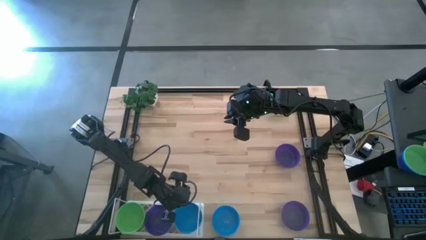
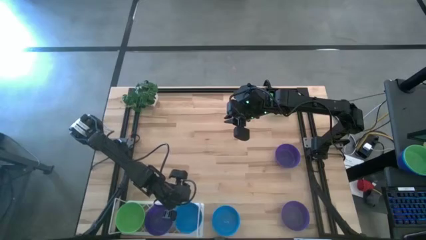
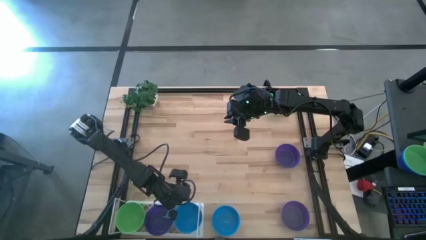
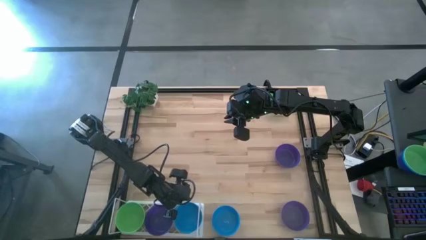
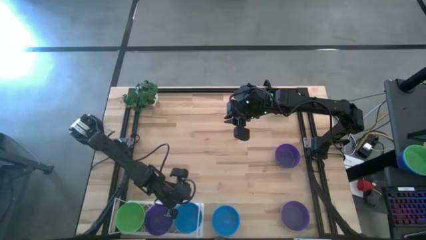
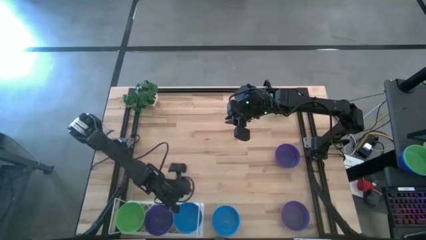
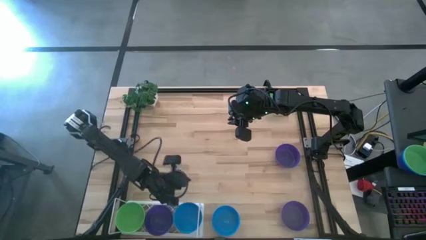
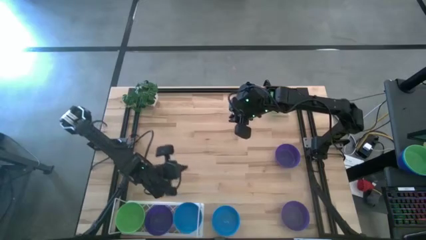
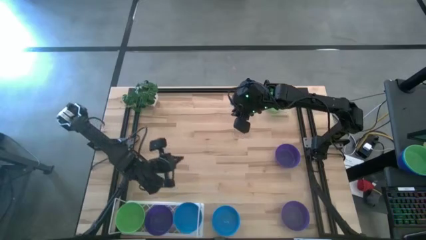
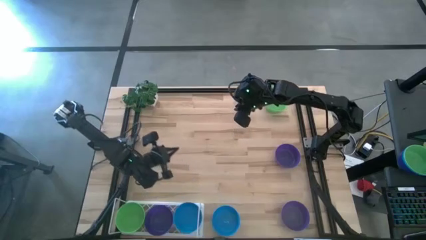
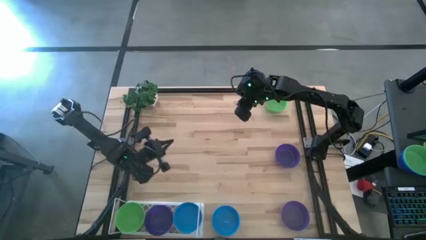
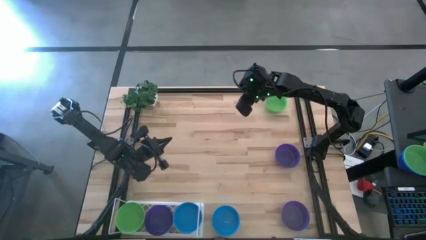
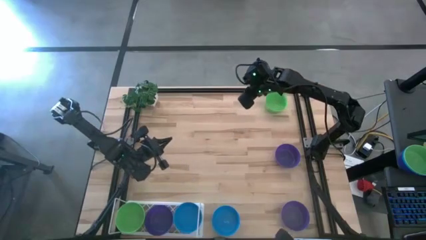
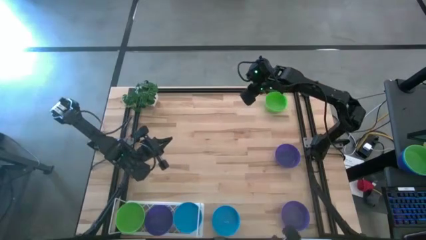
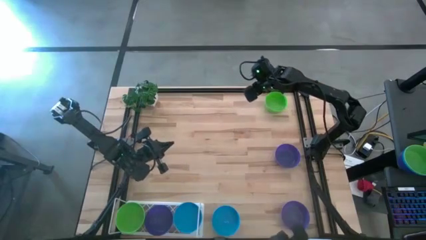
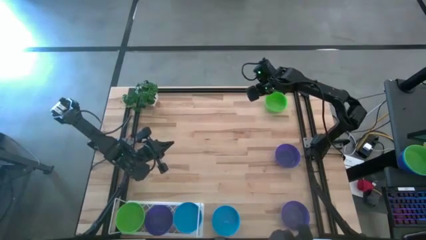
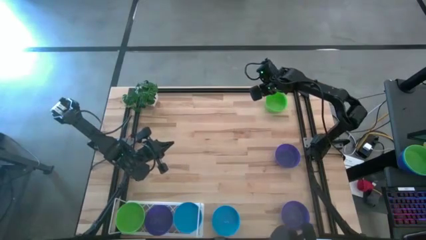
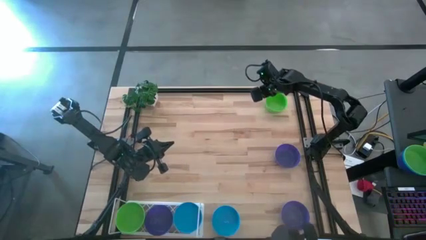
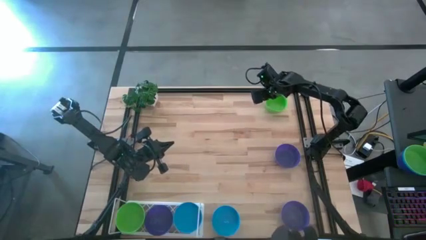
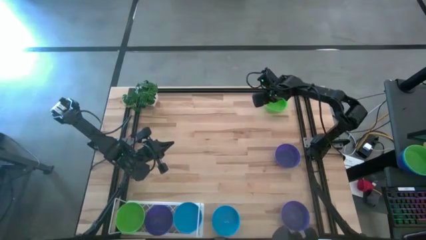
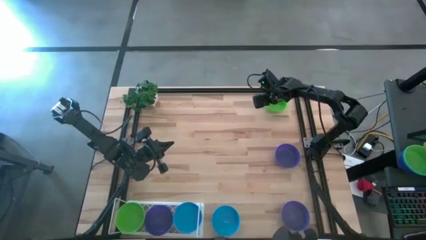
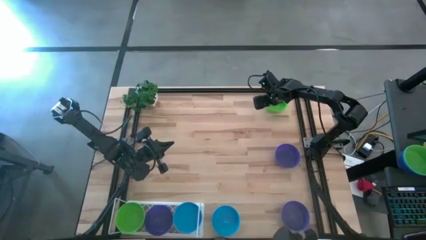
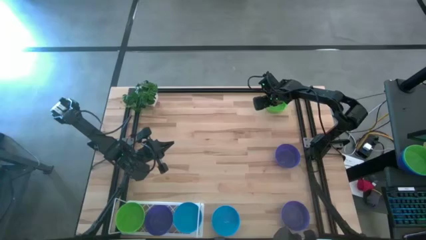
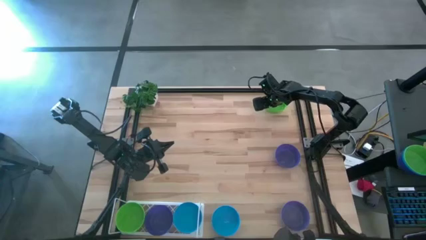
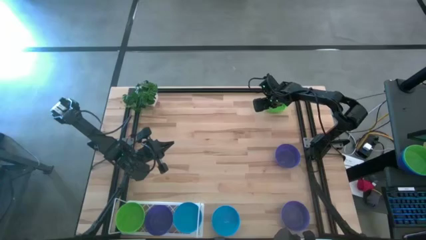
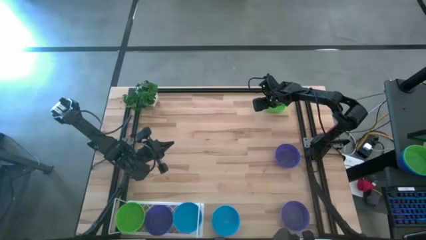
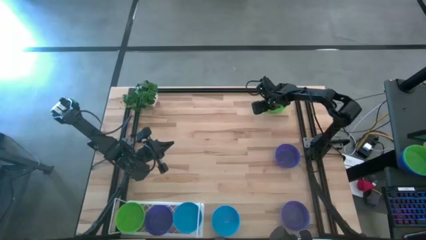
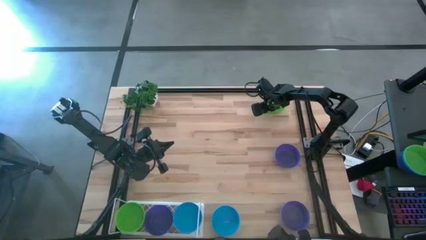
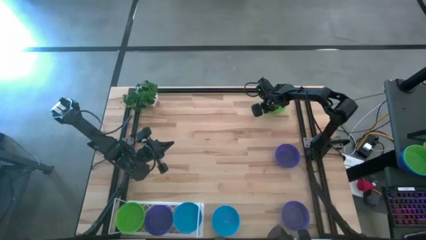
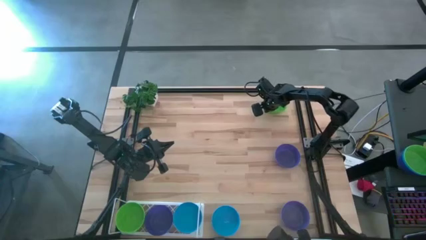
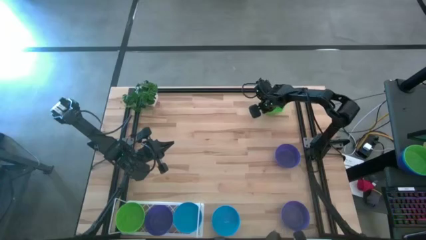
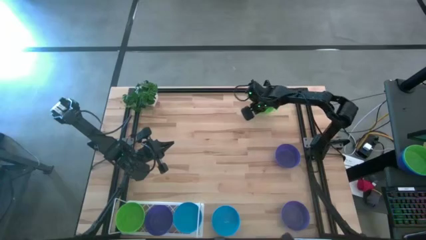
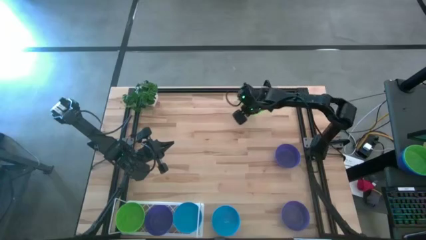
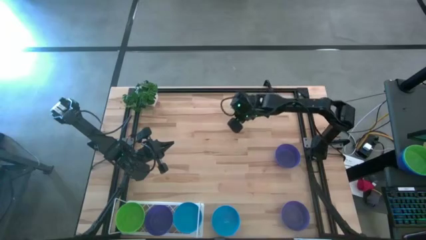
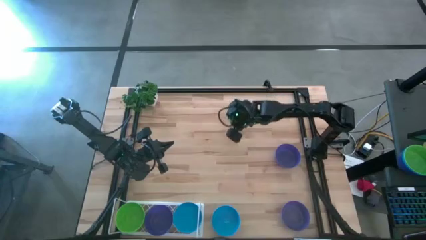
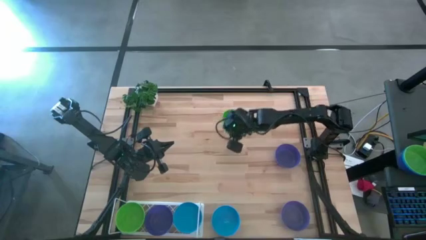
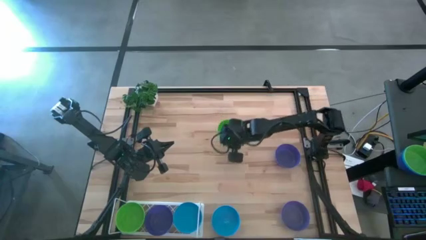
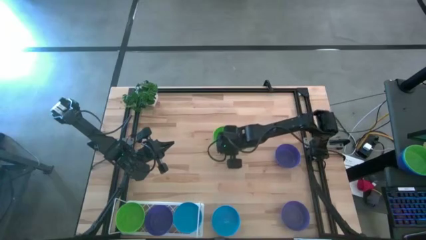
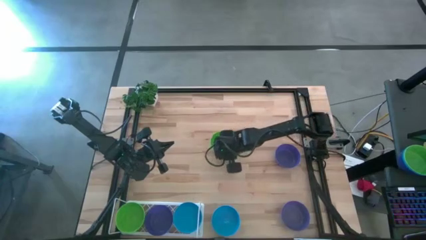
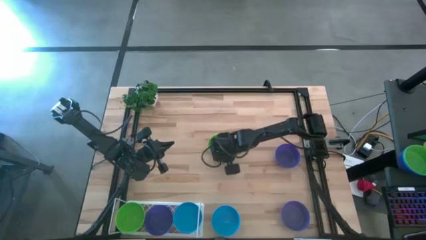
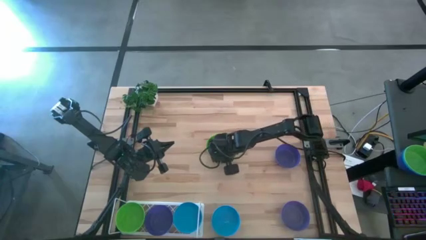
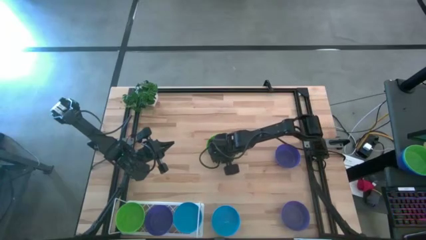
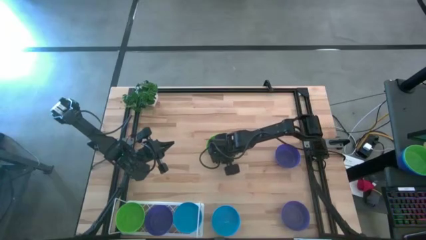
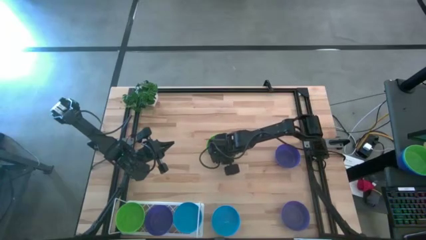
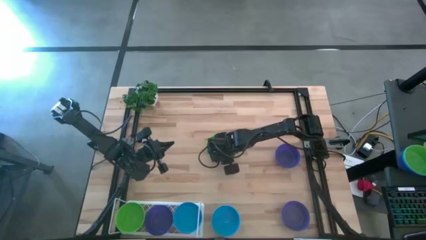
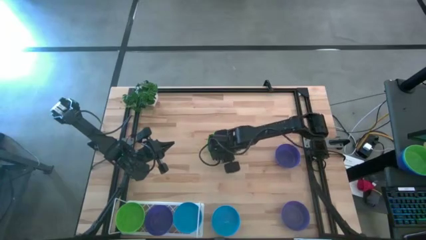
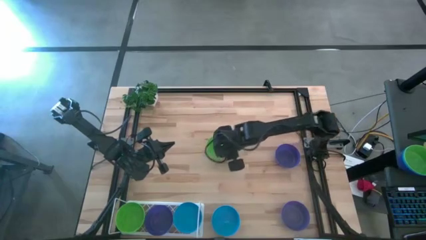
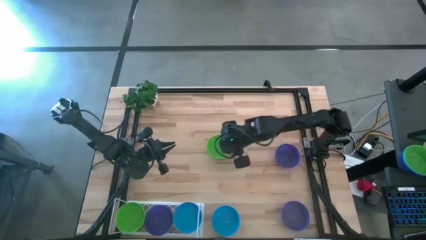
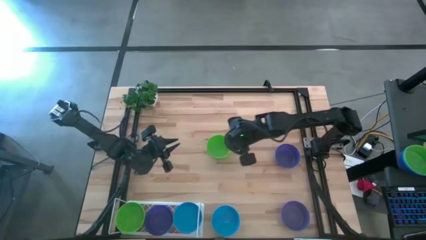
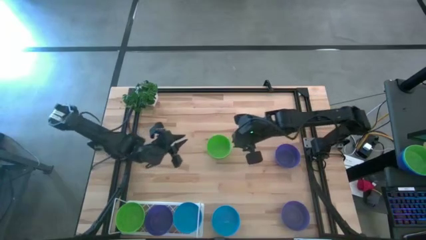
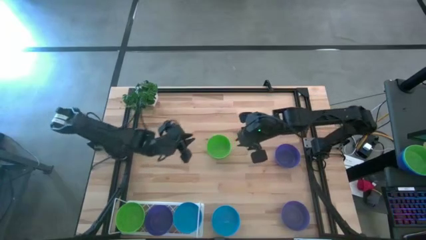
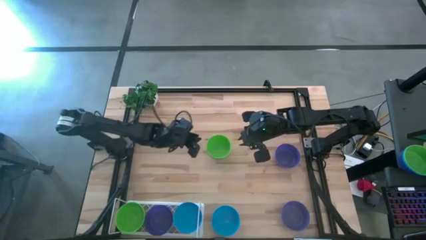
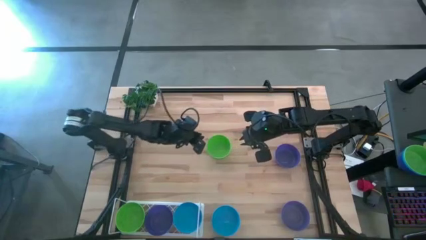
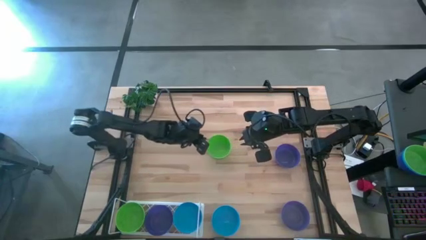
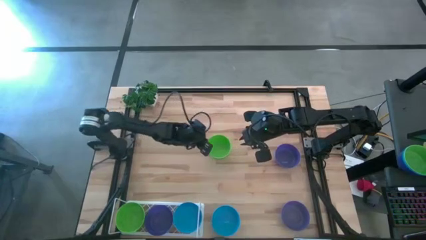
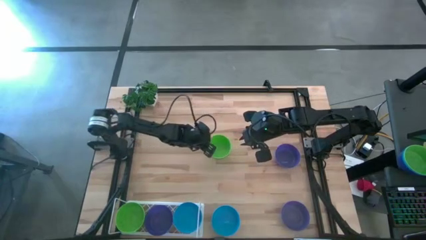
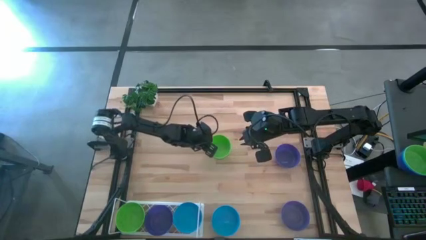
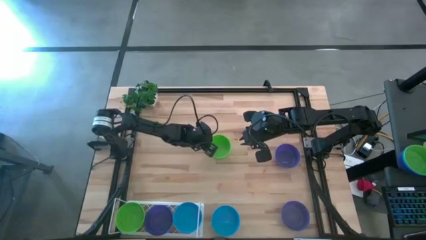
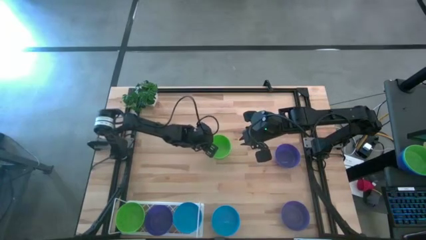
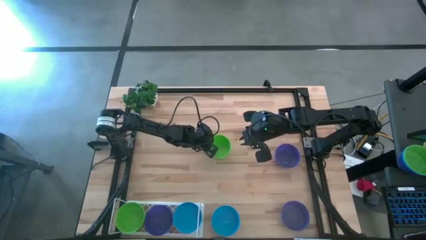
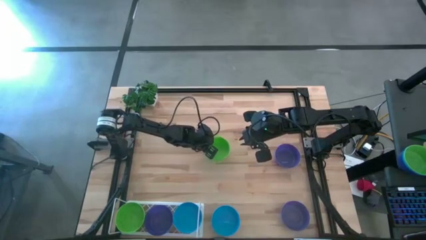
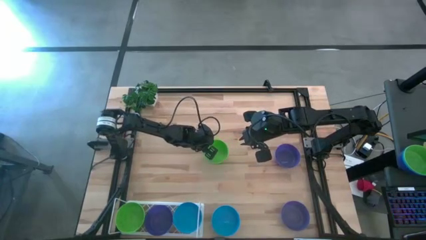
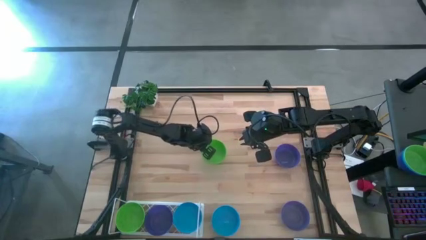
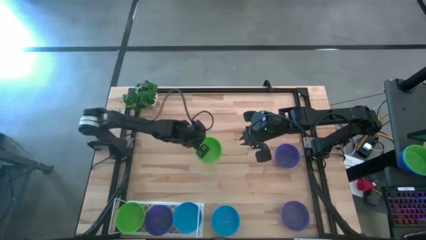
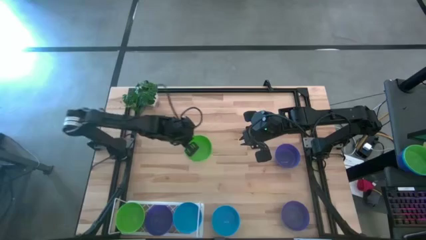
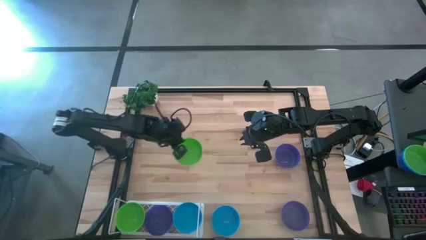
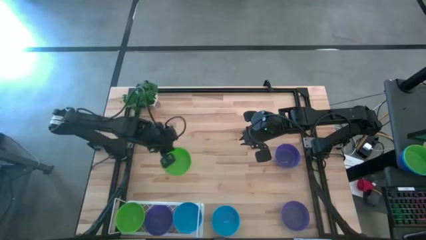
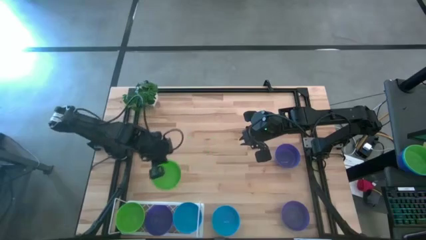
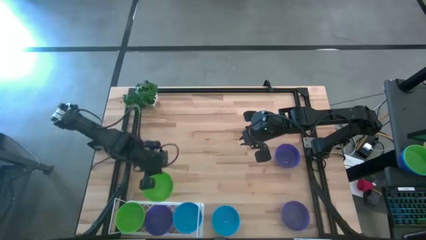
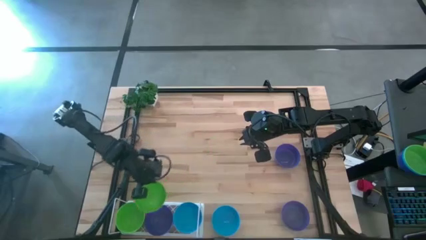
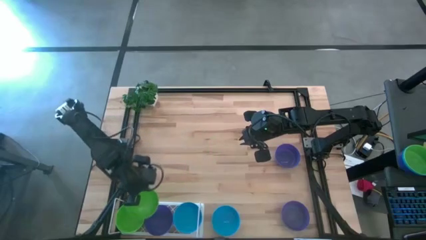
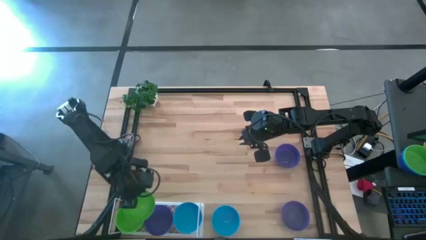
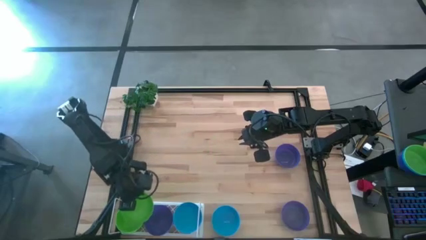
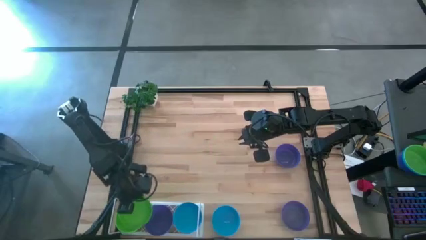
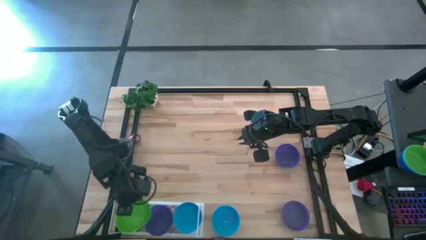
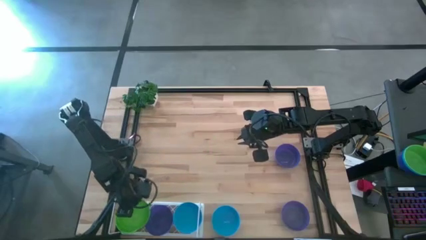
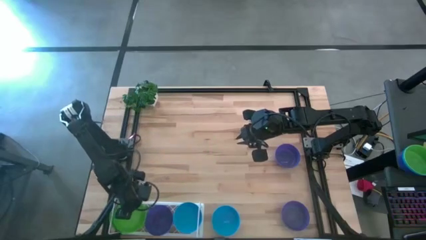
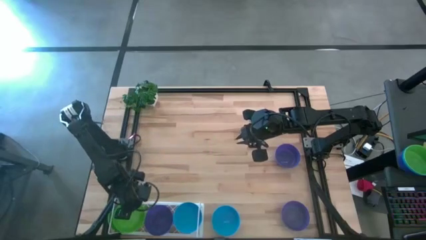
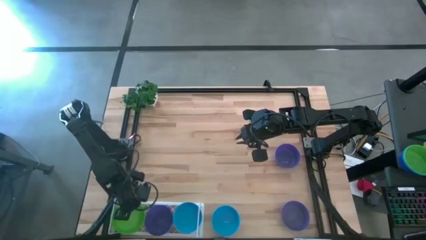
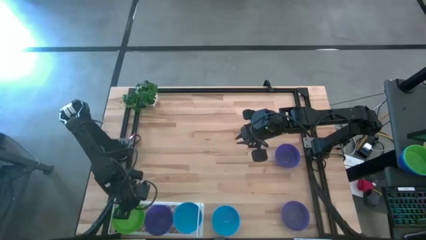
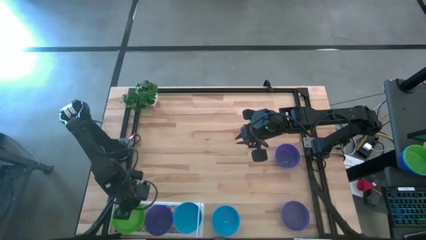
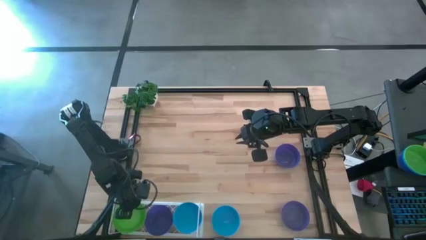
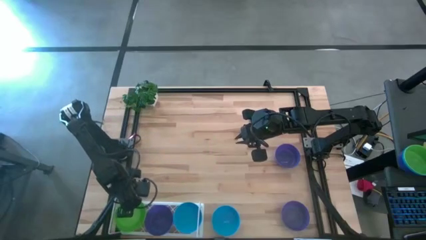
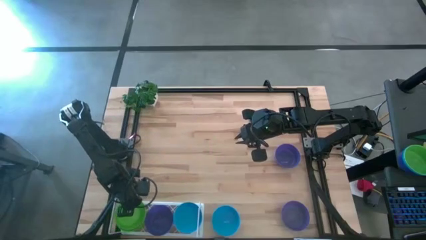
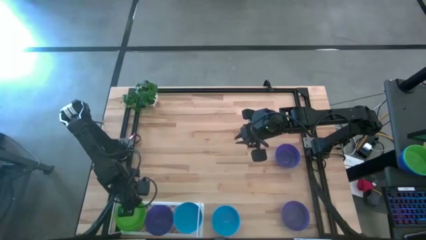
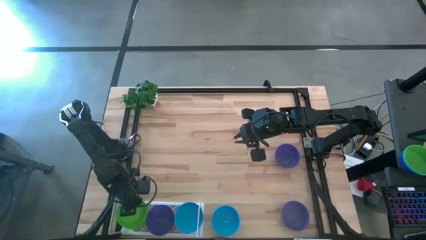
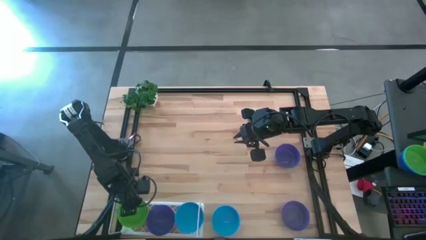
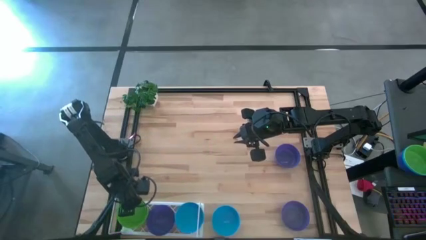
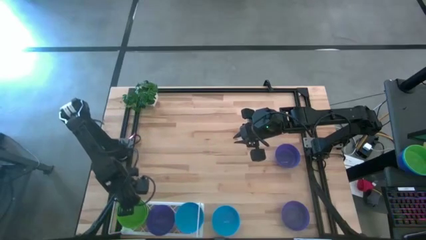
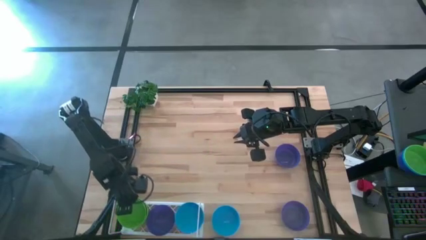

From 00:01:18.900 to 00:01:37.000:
Task: Pick & Place Mini bowls
Stack the green bowl on the green bowl on the shelf
